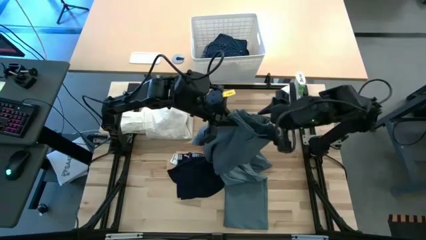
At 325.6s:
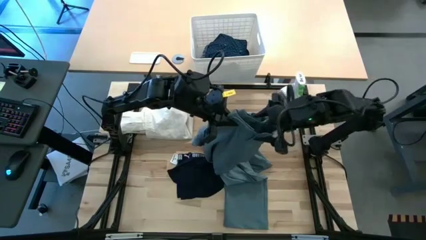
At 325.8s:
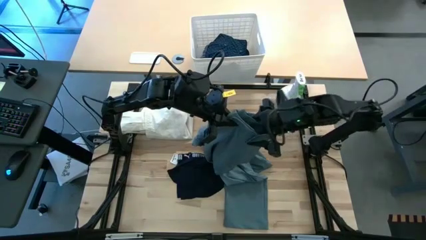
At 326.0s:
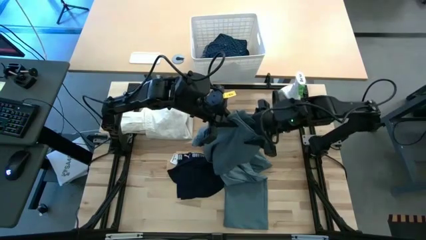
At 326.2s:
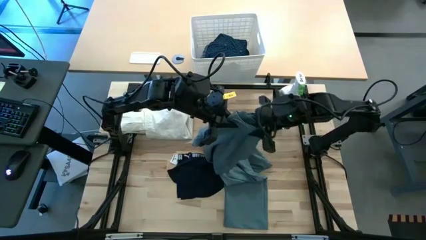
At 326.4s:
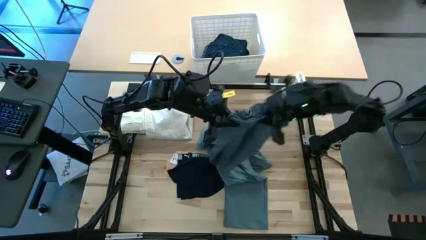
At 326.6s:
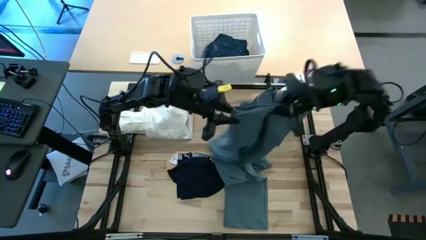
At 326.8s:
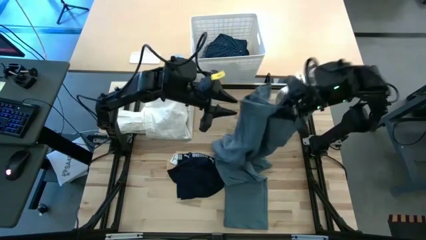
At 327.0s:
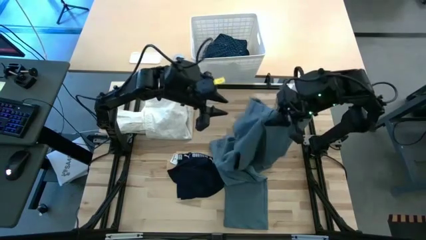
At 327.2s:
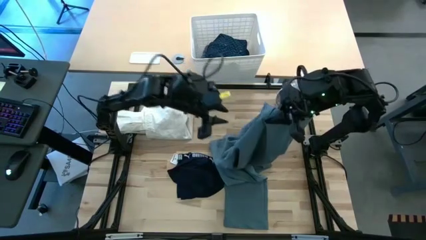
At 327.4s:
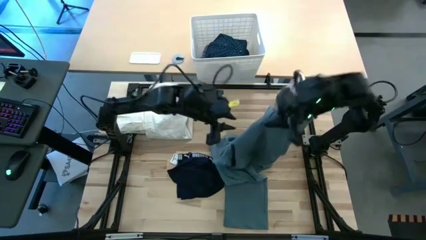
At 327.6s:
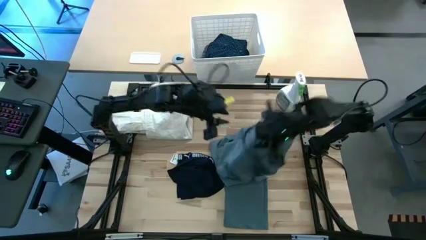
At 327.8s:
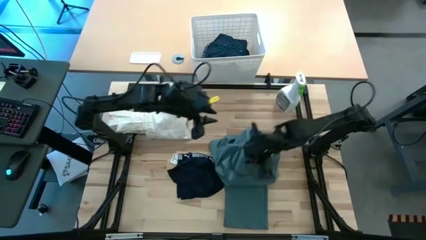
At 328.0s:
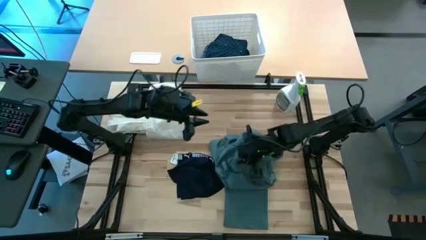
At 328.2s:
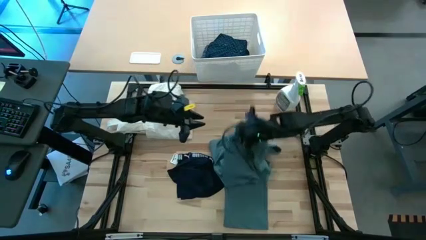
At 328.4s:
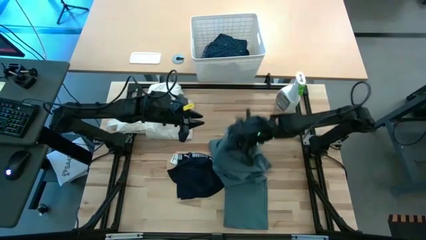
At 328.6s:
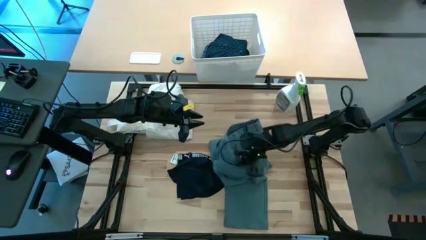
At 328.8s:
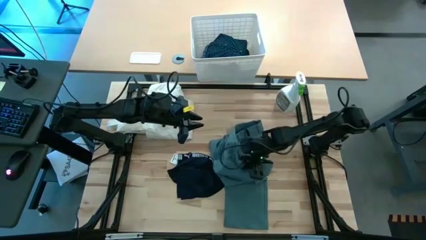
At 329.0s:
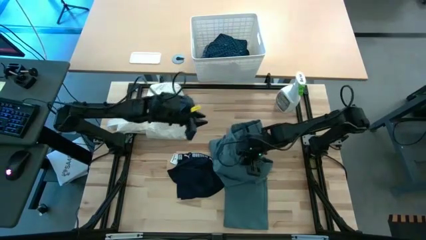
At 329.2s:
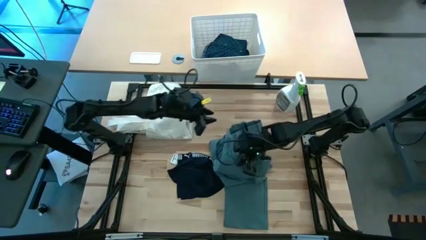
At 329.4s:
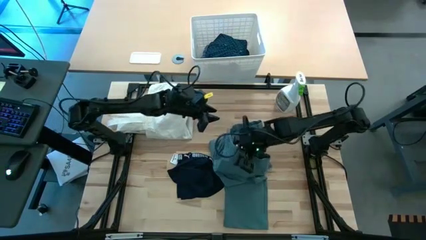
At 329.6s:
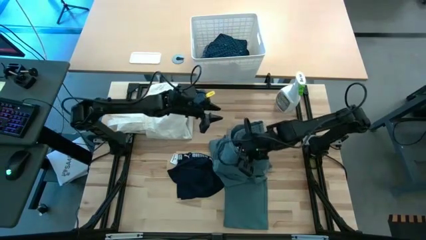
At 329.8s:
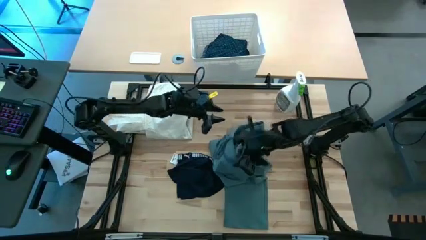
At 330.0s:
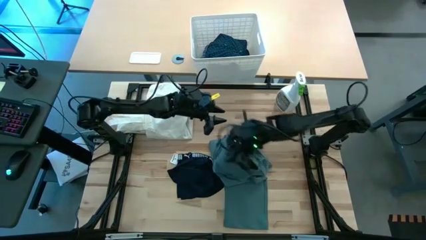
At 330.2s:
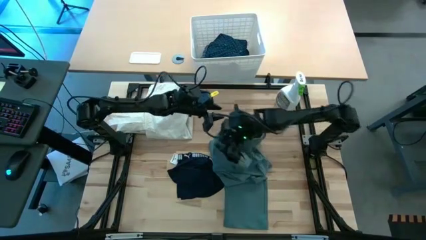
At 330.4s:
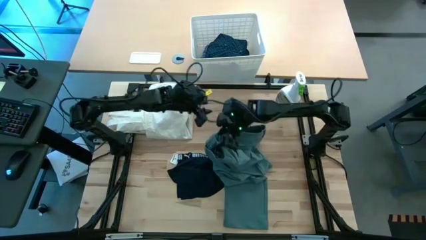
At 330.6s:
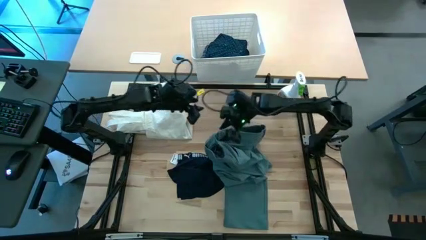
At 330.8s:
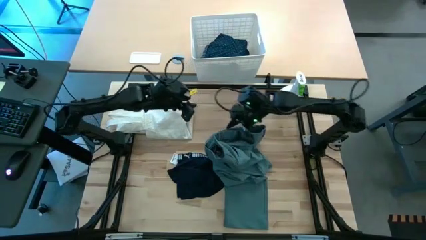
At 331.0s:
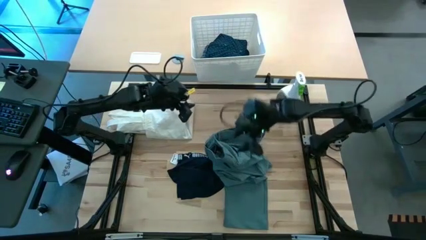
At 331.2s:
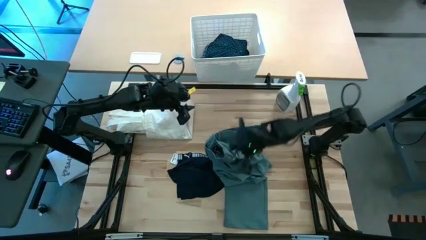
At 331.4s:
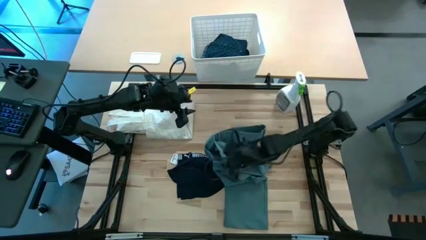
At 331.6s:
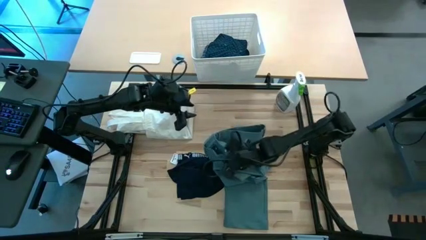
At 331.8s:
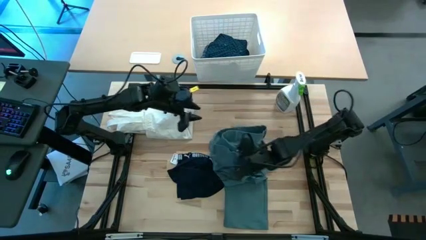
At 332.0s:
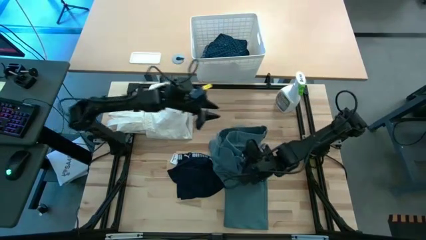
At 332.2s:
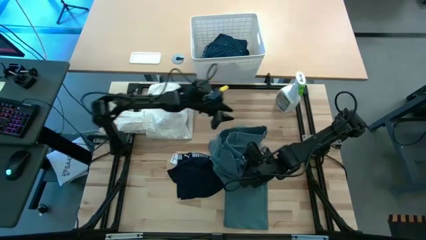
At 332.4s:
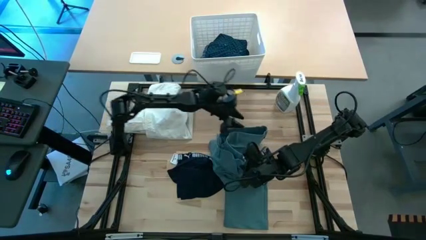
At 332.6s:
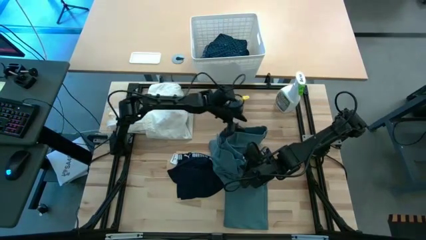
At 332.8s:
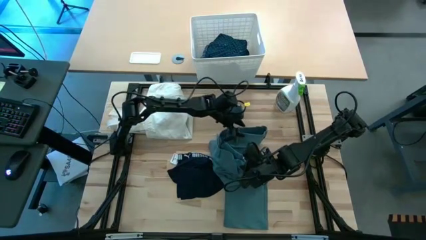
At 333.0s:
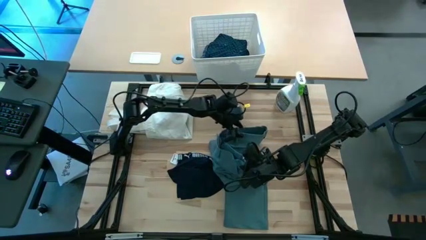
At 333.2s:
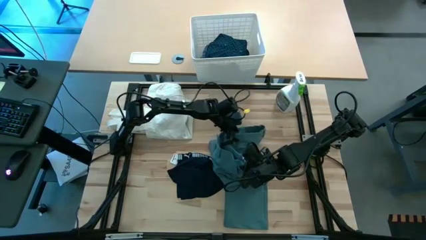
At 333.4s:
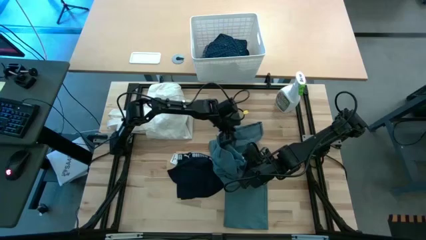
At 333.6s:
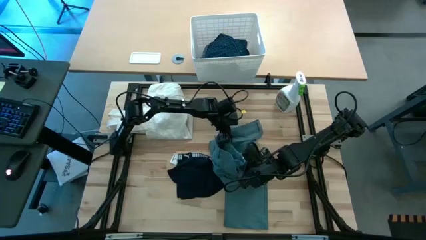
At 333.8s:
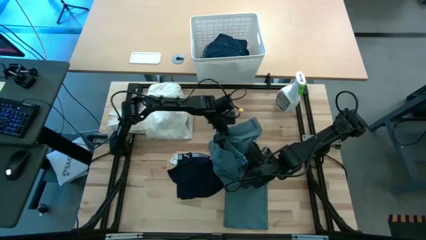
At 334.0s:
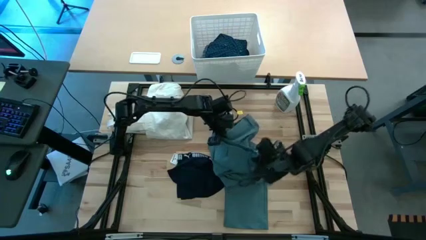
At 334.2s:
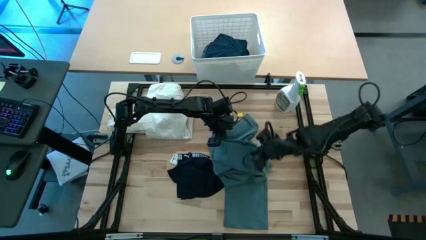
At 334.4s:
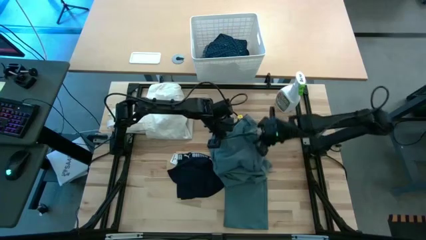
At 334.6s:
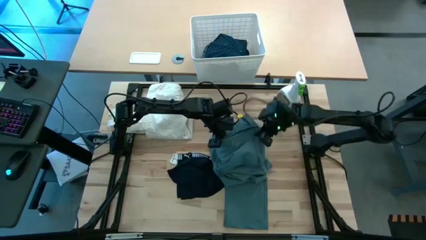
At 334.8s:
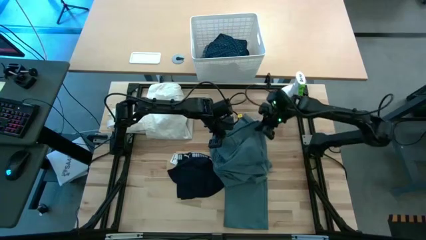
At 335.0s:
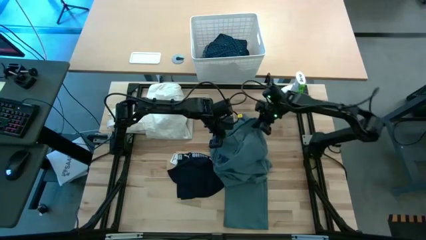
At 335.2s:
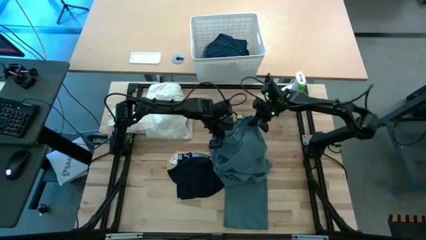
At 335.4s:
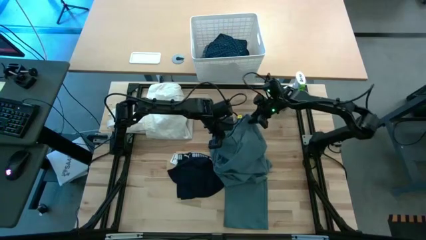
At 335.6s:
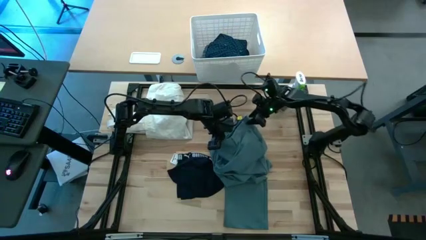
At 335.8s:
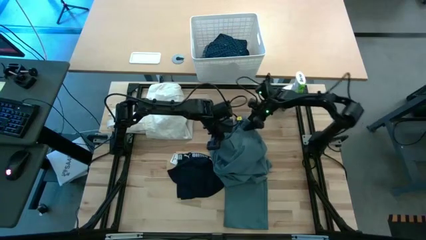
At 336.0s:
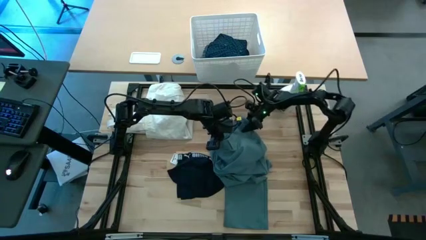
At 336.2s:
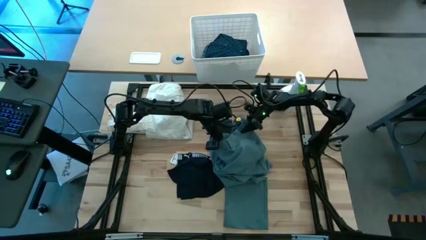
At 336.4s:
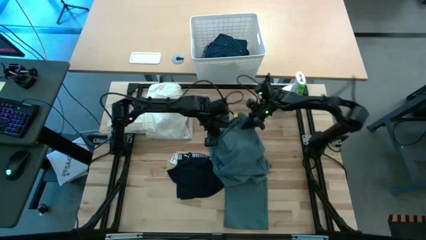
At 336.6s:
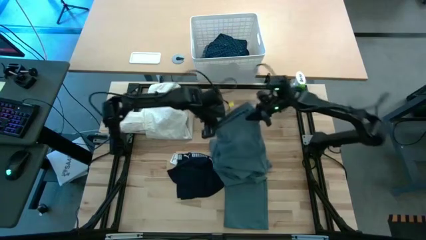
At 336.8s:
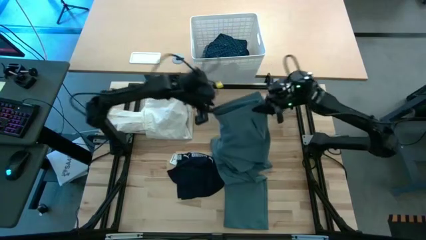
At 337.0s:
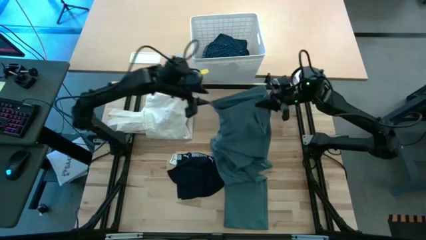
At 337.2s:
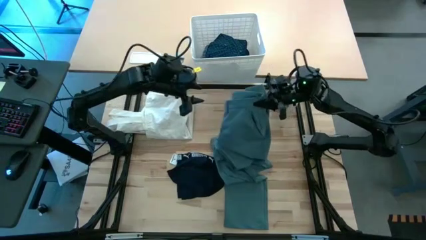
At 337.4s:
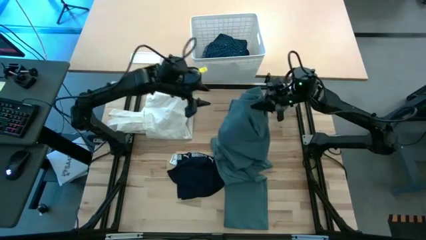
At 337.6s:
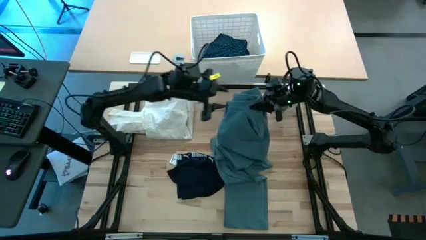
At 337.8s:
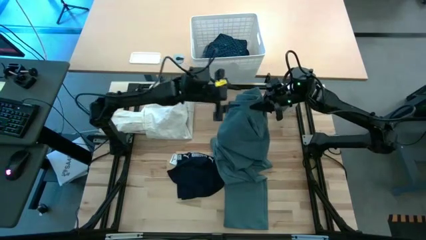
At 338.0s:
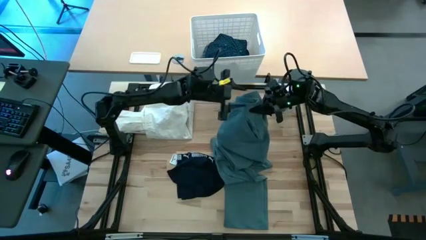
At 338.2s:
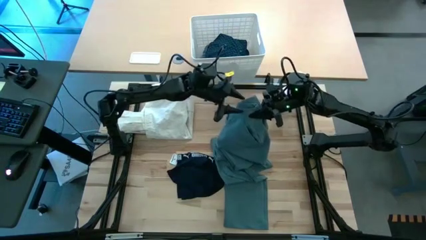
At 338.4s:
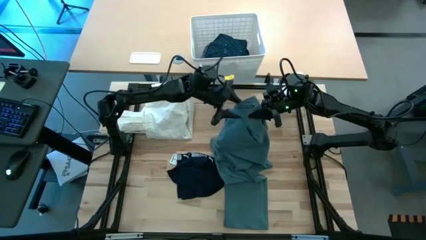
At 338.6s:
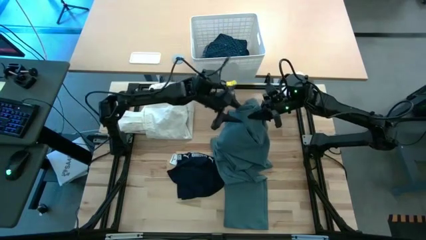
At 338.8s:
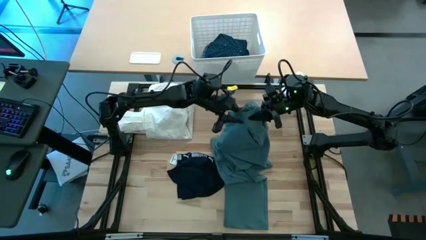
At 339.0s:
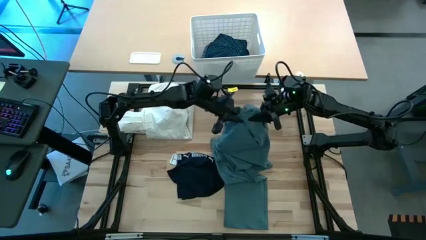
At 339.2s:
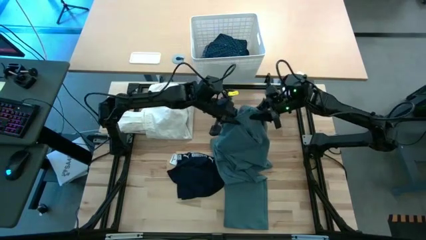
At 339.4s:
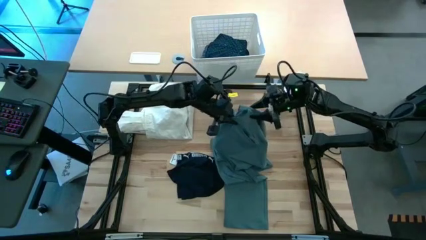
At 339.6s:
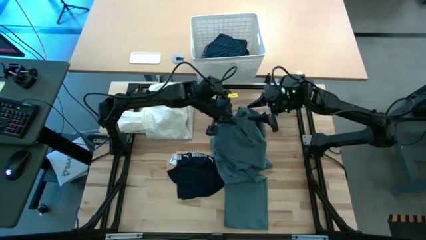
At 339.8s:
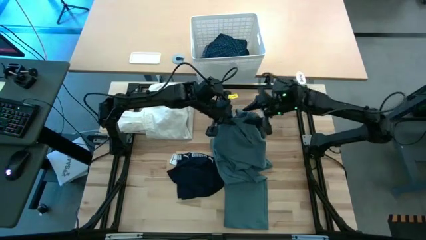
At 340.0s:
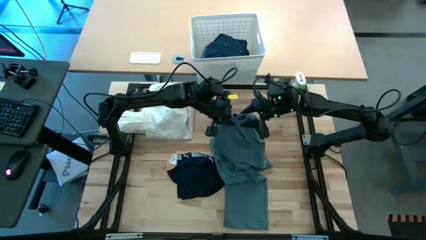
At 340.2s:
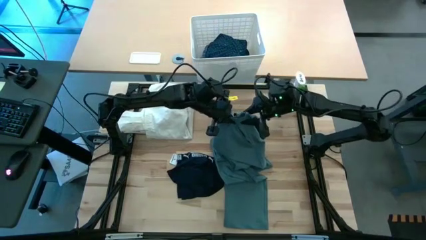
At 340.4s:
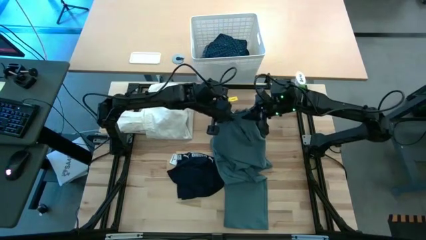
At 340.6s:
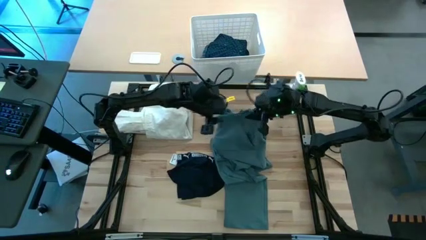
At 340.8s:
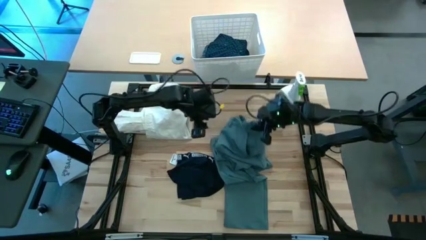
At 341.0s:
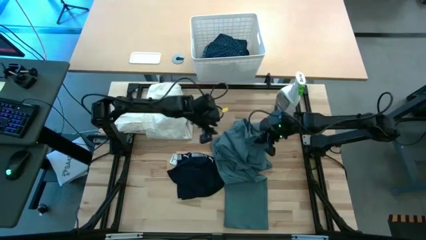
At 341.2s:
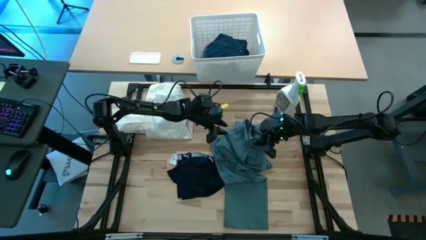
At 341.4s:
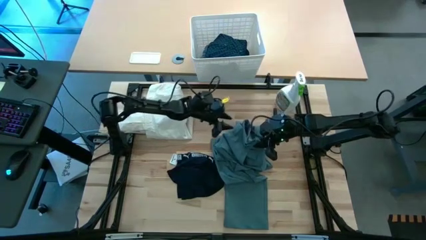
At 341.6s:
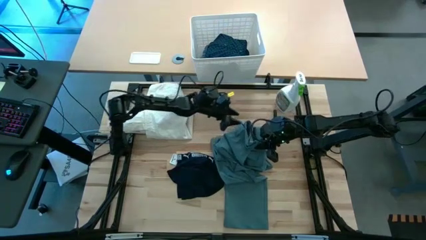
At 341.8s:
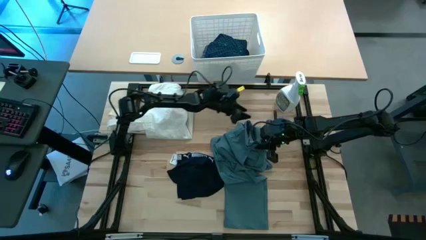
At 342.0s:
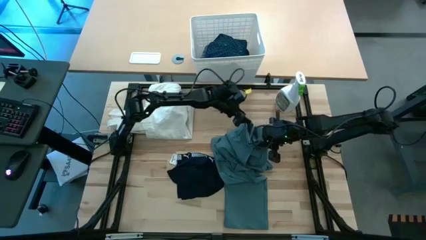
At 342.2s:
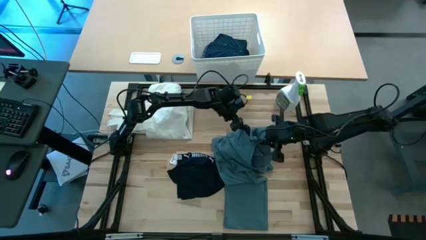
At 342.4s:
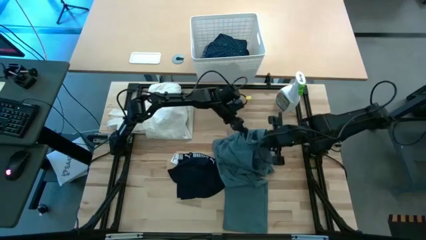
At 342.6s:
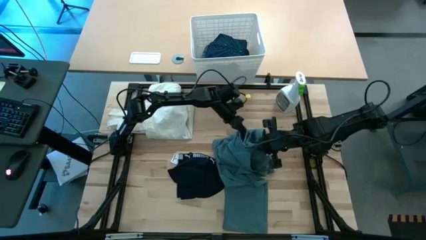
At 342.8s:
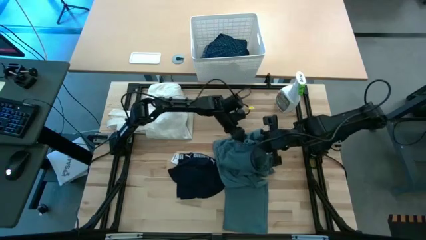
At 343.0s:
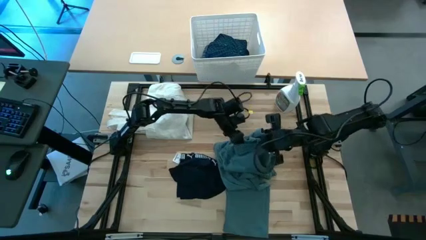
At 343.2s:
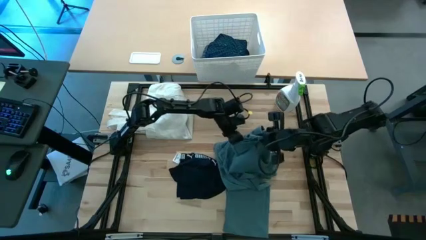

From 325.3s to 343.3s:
Fold the green pants
